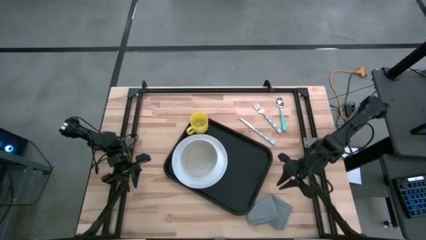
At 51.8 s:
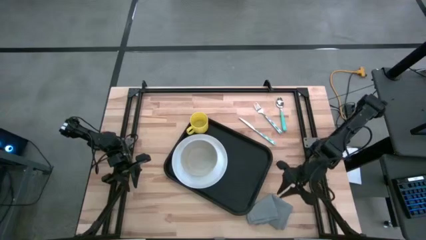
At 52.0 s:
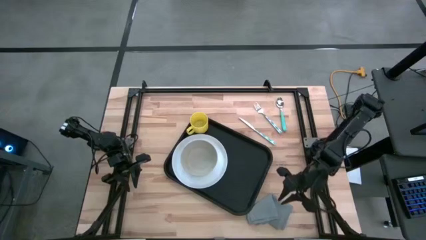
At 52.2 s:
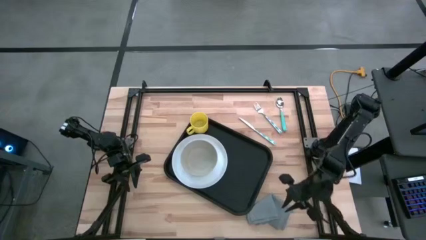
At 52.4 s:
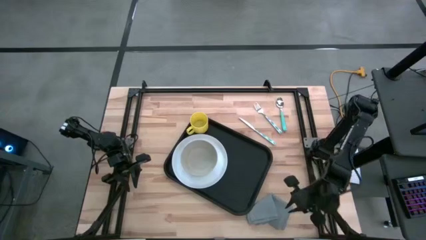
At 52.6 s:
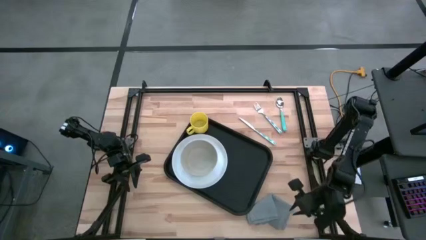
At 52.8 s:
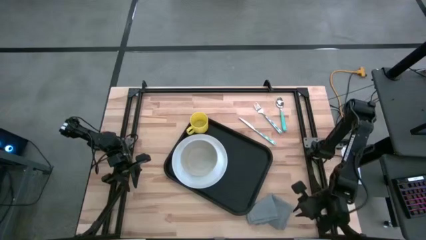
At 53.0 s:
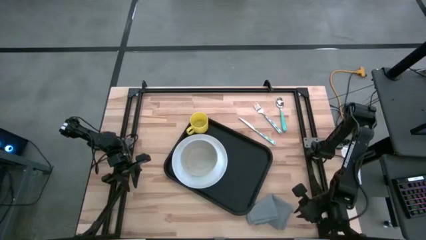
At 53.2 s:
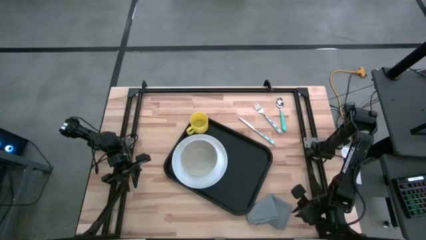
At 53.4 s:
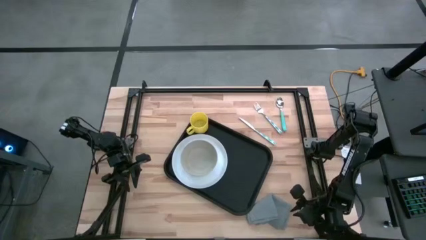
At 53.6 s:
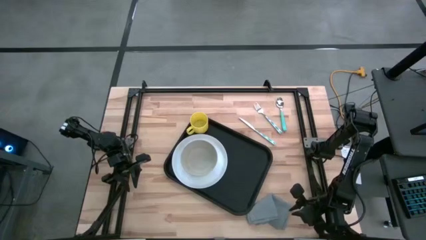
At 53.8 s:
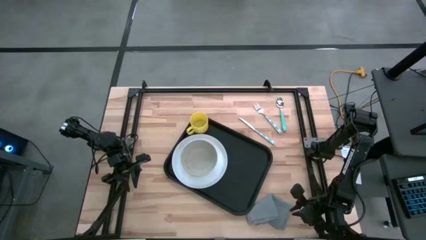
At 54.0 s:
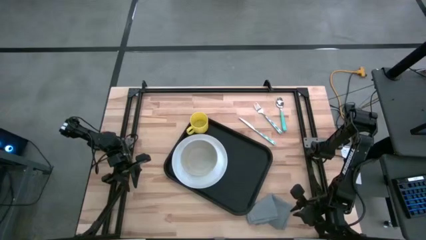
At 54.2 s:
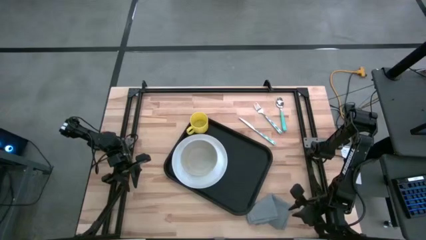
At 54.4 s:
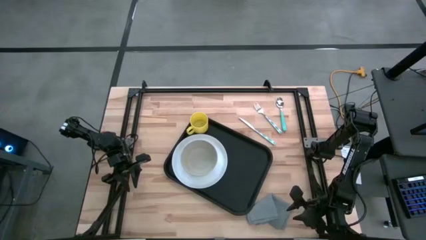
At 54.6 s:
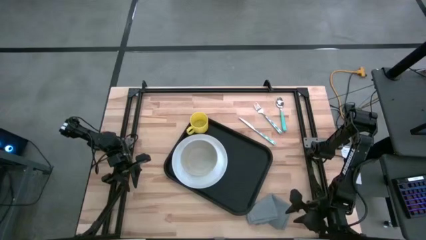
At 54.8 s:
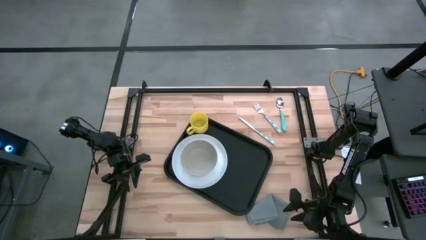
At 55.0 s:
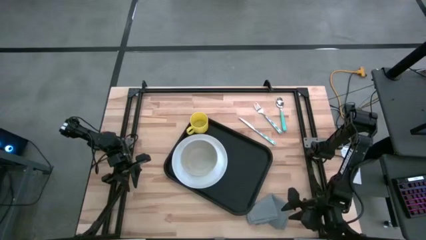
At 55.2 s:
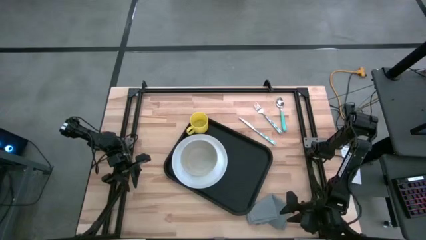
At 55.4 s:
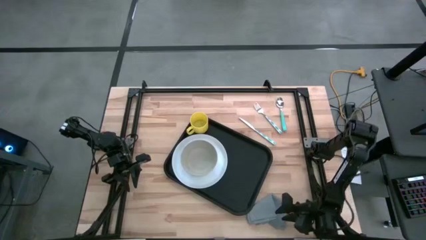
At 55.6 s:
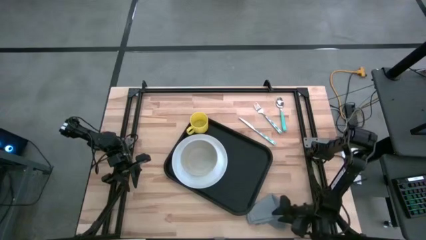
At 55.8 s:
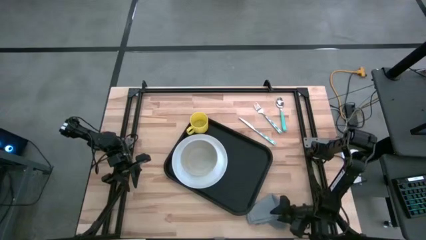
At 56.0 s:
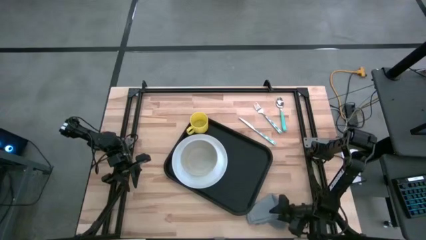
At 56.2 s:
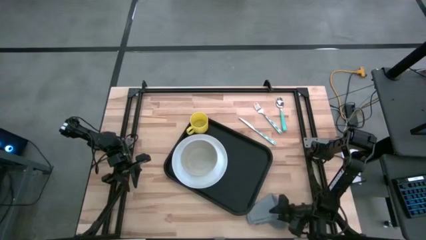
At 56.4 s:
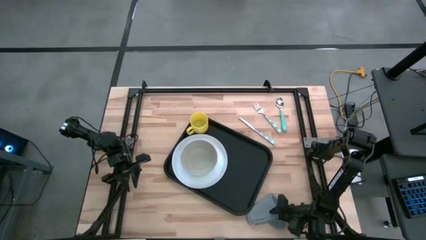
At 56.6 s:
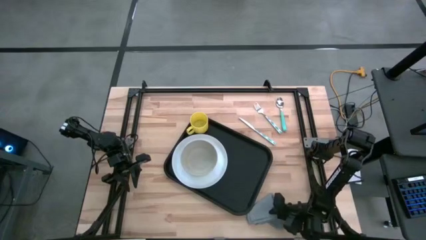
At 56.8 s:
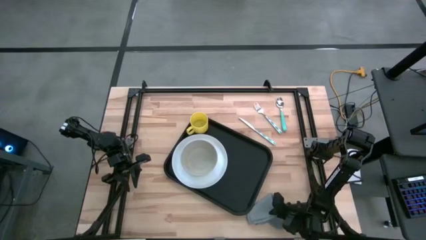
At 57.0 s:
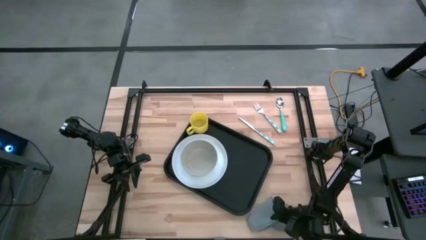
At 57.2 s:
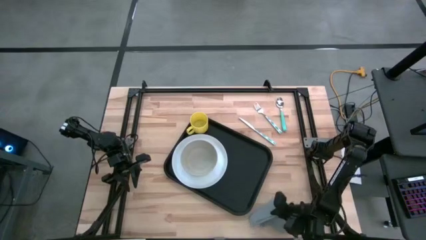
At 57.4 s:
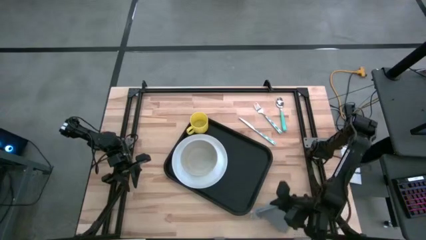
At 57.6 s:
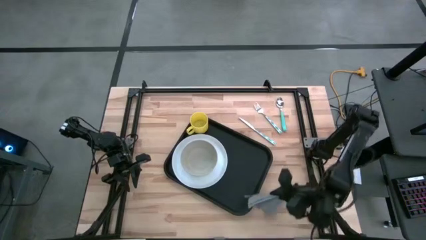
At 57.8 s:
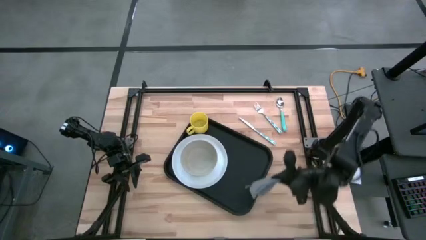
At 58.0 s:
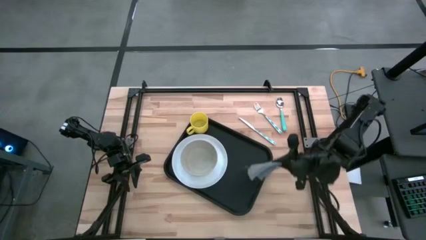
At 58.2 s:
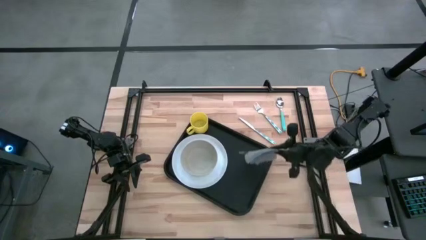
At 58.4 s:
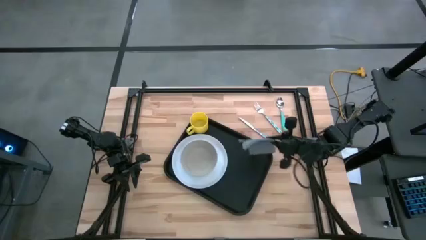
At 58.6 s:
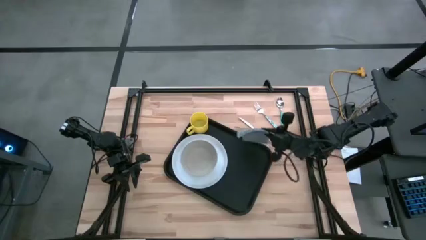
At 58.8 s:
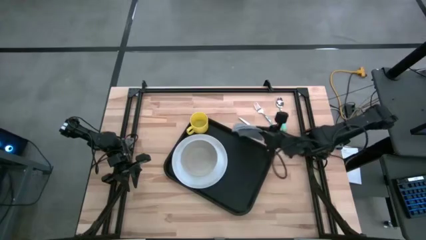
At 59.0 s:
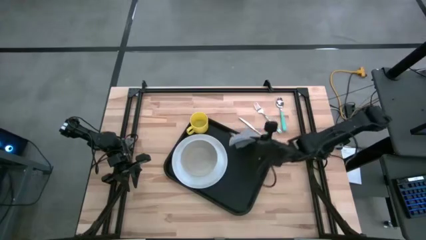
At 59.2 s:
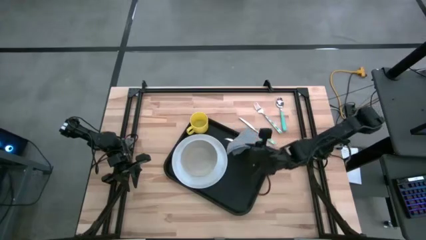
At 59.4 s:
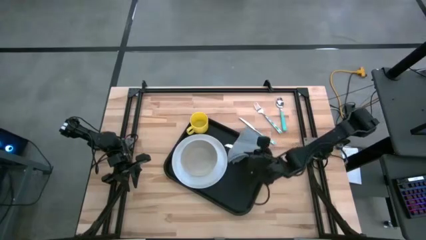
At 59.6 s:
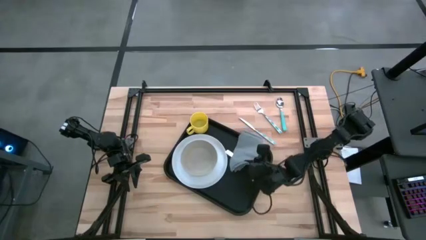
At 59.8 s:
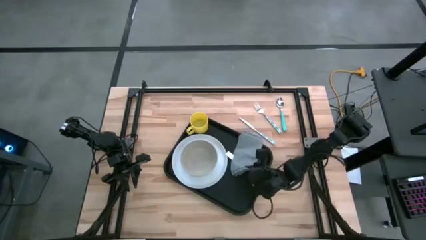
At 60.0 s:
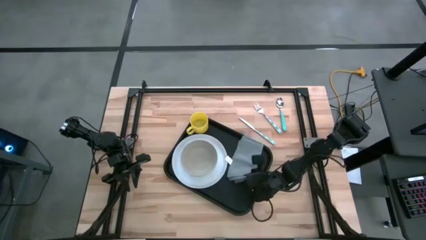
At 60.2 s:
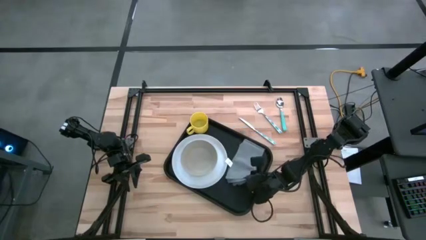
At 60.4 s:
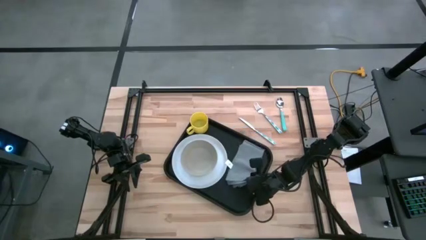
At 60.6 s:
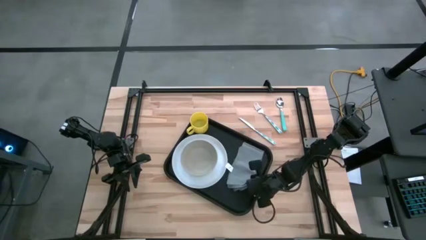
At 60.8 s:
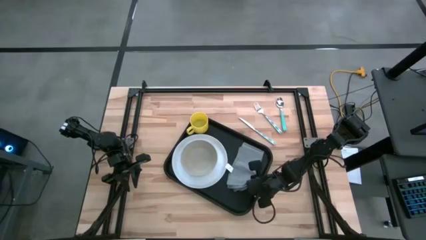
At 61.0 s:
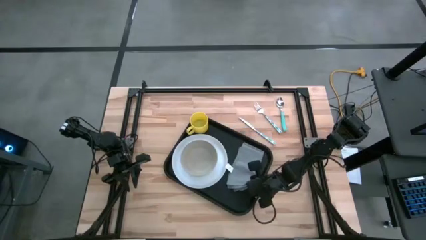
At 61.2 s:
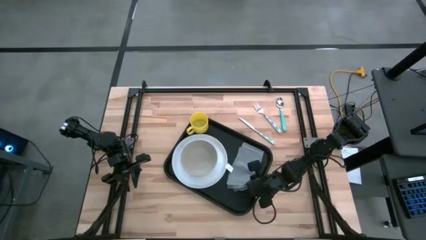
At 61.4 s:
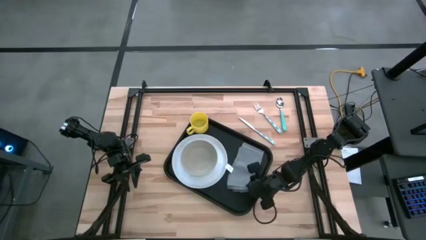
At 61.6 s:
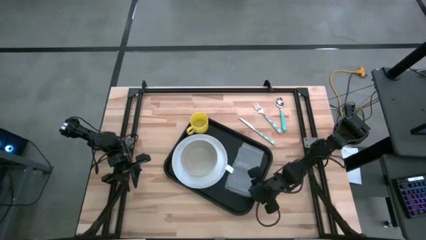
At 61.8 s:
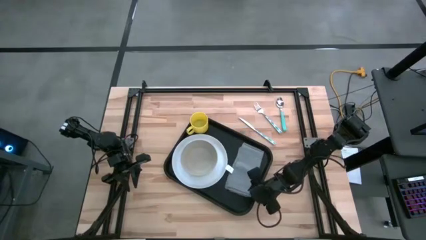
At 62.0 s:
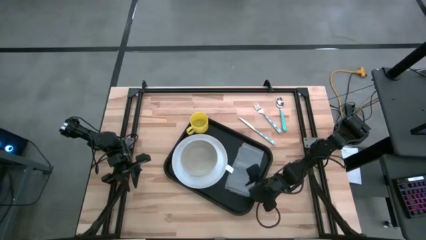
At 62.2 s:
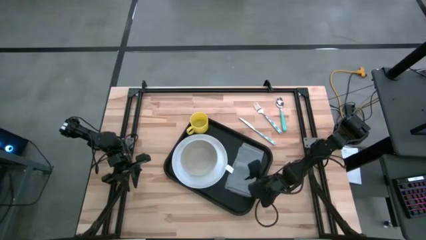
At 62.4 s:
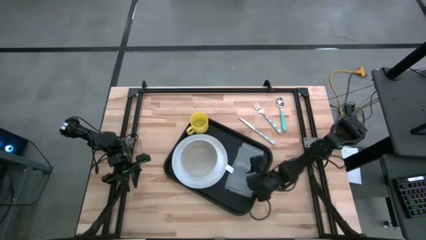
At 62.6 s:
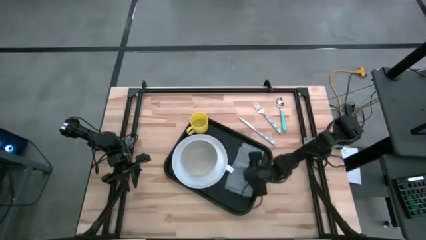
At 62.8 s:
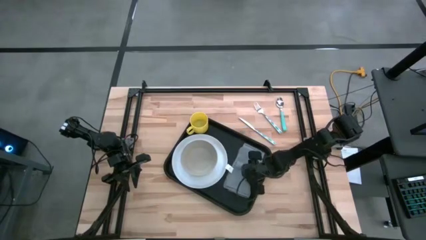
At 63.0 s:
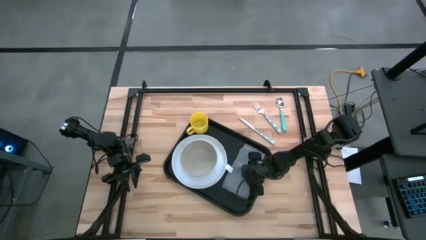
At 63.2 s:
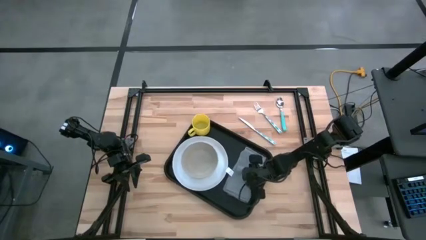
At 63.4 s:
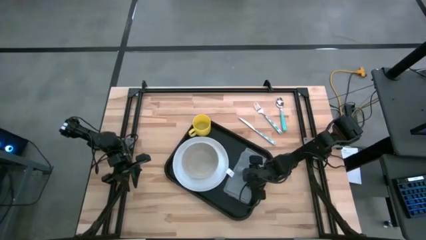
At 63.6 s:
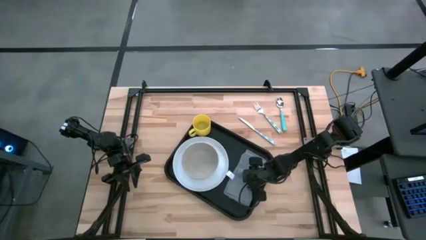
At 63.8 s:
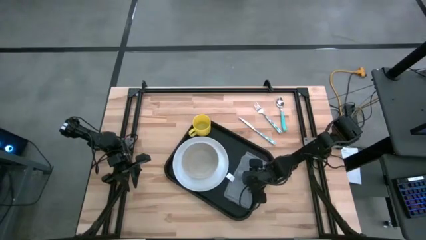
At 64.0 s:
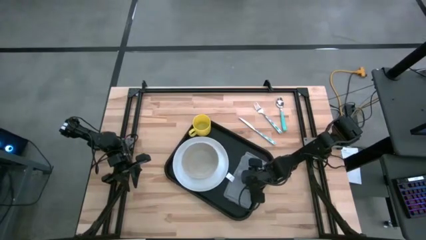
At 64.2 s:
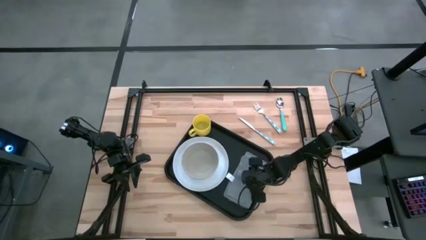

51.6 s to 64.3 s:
Task: Set up tray
Put the gray napkin on the black serving tray to the right of the white plate

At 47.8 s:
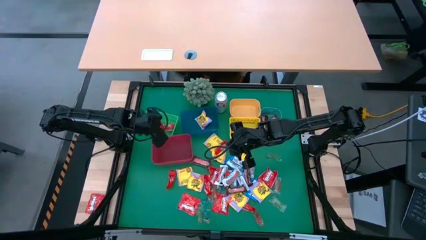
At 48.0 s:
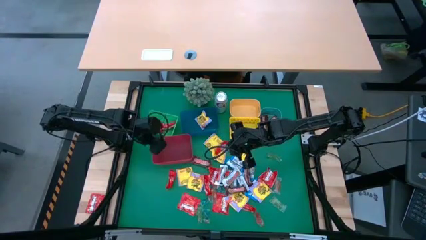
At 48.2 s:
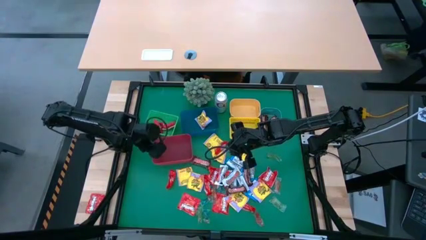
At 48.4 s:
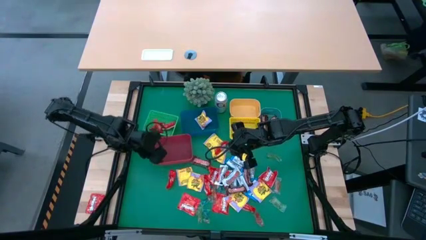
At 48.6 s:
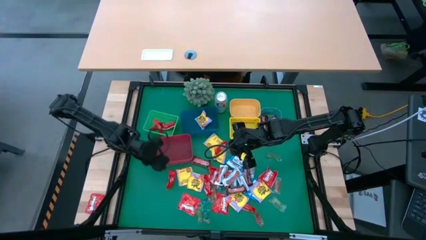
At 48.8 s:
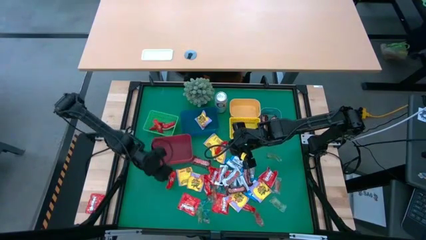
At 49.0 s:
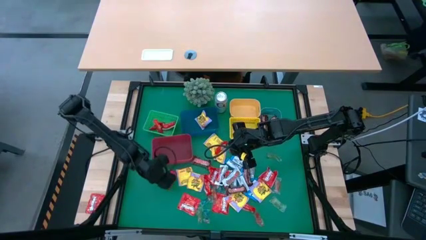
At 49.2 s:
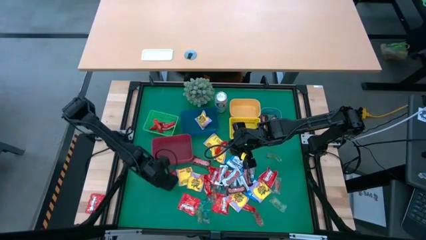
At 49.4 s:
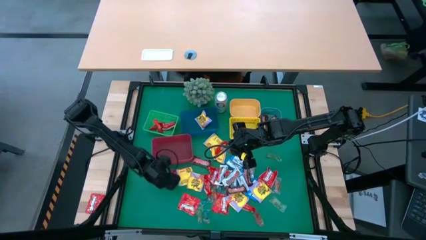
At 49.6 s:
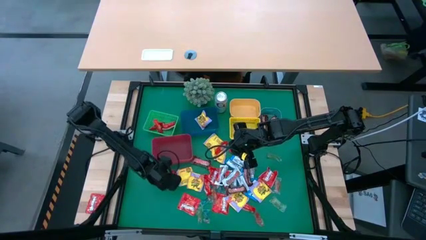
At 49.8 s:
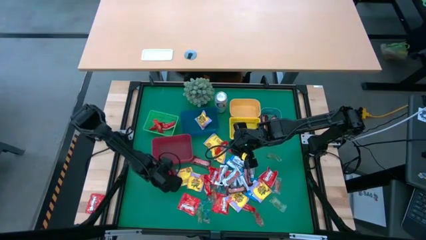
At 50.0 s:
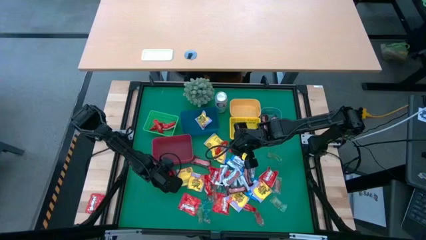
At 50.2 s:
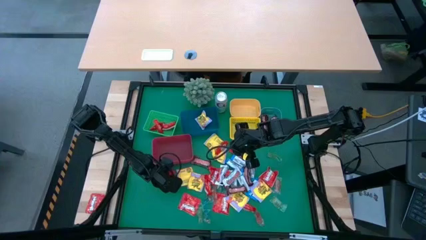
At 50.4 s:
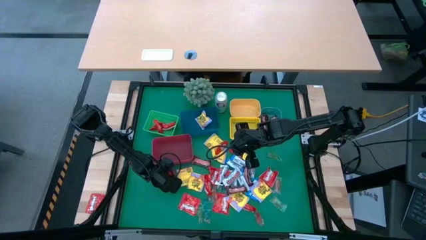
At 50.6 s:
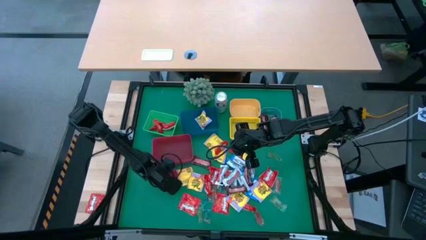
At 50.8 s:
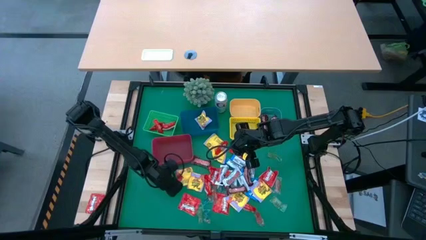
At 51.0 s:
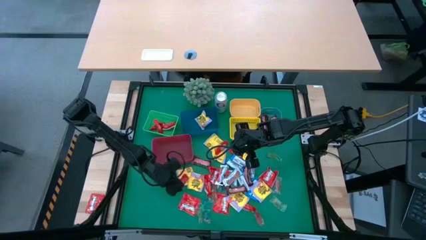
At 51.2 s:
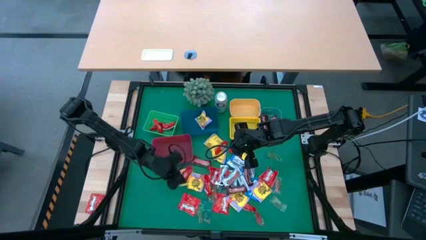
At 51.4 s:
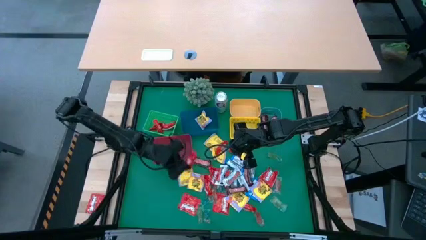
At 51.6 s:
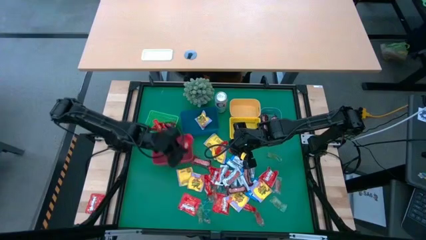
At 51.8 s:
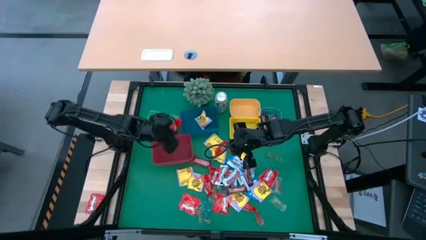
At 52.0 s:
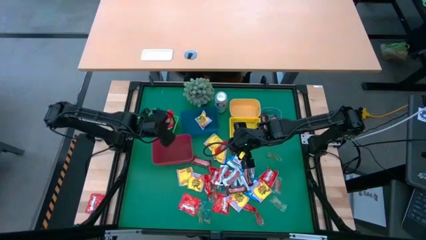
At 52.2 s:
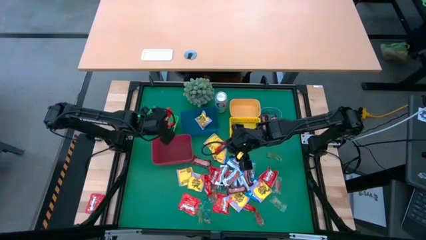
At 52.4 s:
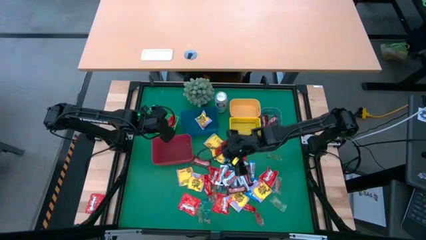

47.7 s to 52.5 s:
Task: Sort candy
Put the red chocolate bar into the green bin
